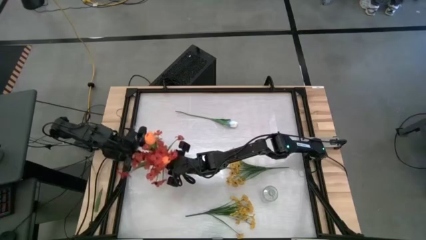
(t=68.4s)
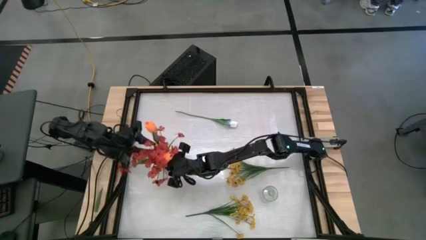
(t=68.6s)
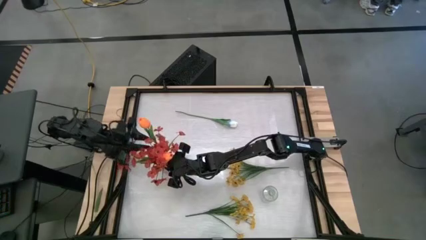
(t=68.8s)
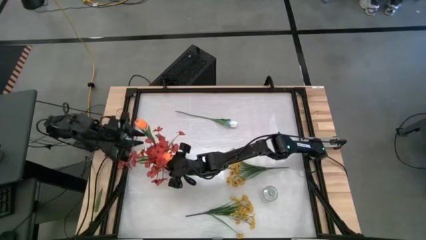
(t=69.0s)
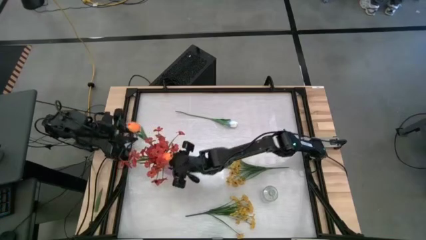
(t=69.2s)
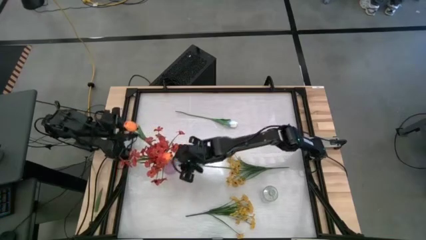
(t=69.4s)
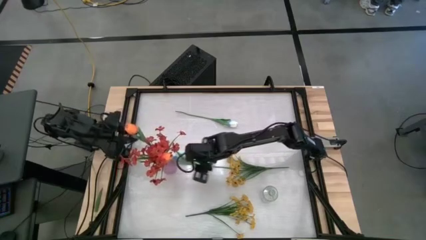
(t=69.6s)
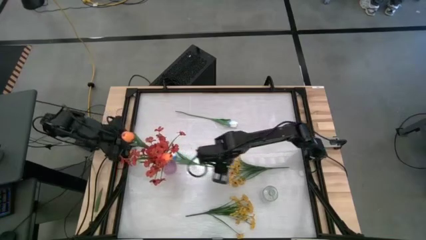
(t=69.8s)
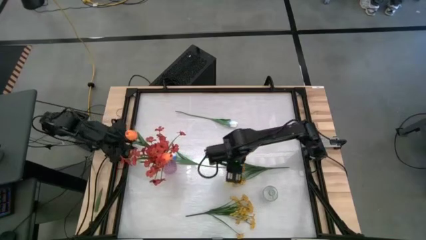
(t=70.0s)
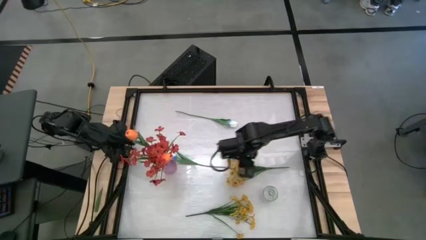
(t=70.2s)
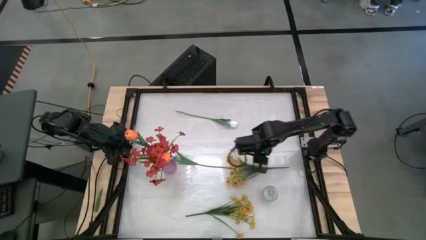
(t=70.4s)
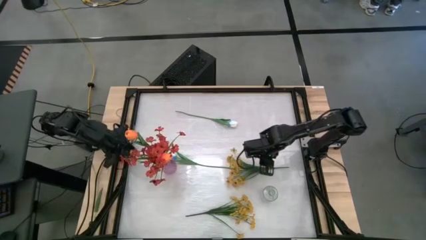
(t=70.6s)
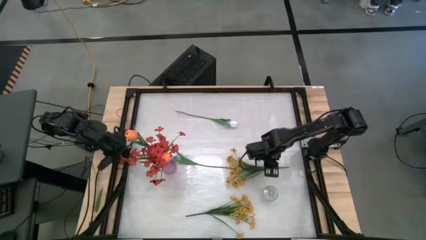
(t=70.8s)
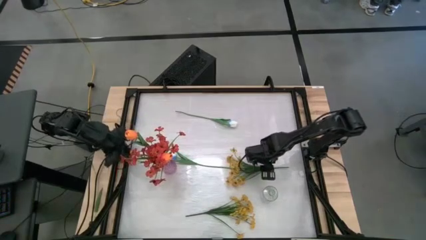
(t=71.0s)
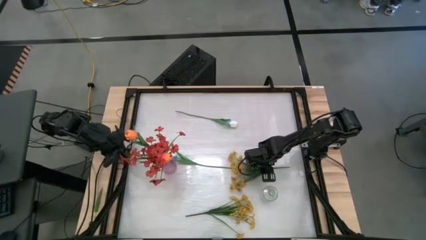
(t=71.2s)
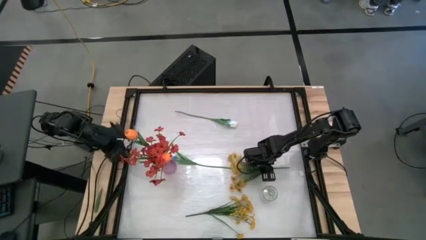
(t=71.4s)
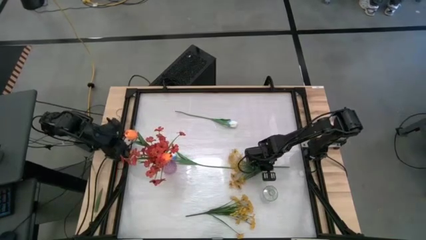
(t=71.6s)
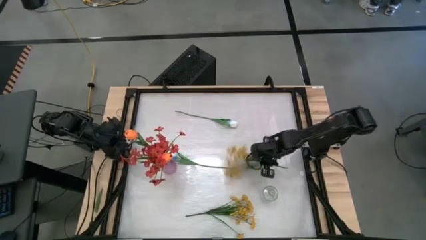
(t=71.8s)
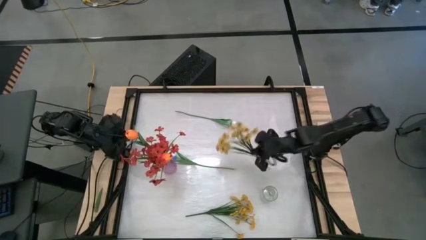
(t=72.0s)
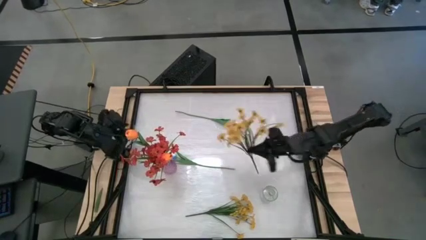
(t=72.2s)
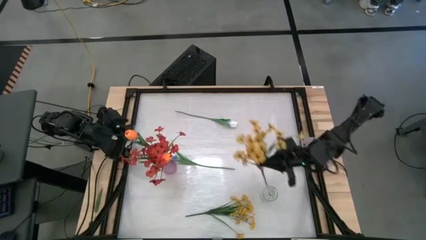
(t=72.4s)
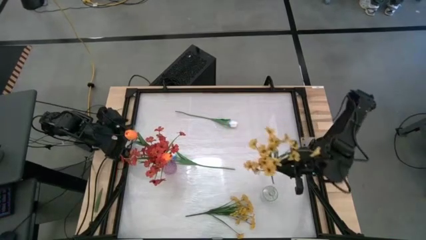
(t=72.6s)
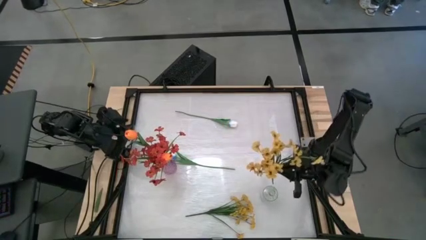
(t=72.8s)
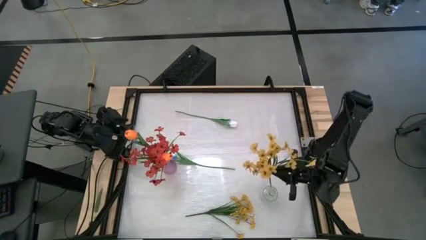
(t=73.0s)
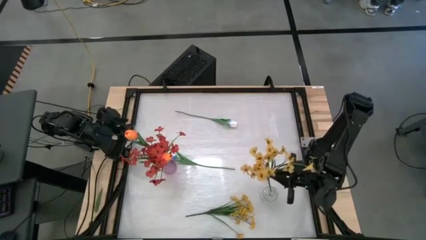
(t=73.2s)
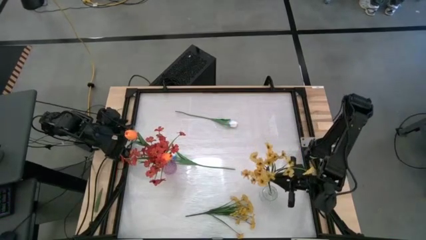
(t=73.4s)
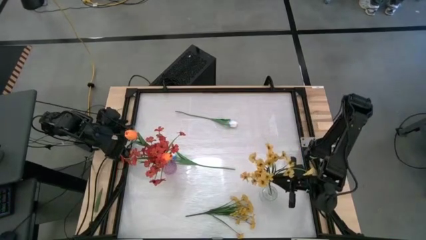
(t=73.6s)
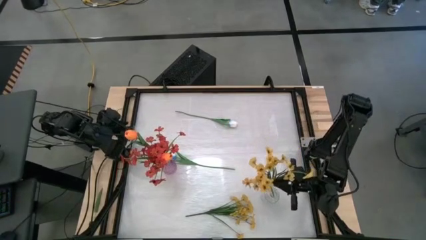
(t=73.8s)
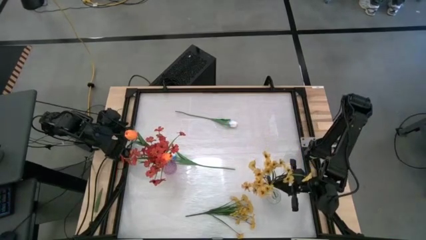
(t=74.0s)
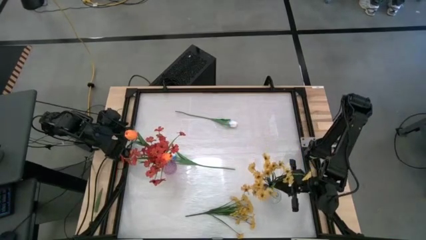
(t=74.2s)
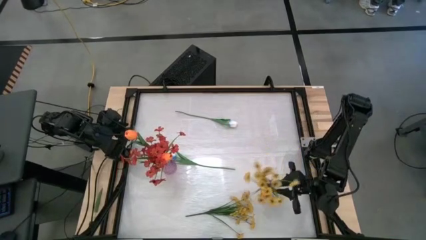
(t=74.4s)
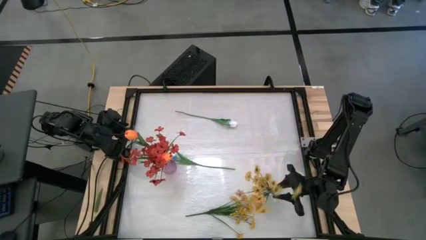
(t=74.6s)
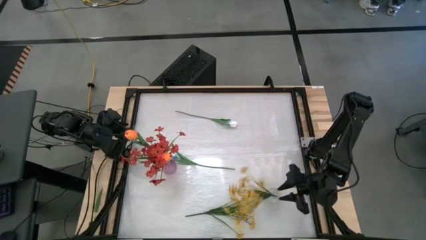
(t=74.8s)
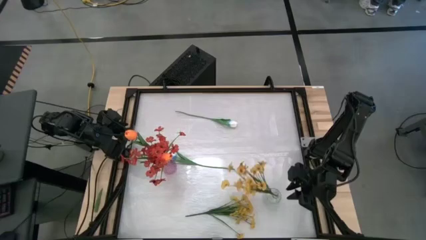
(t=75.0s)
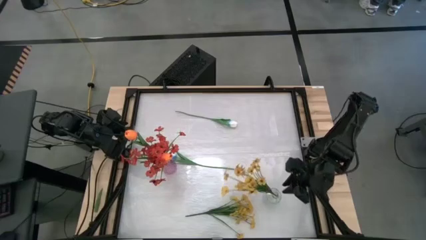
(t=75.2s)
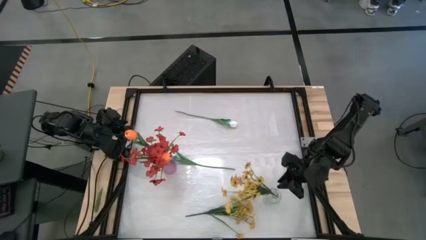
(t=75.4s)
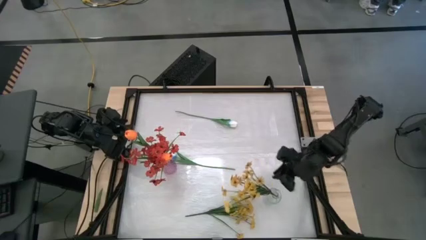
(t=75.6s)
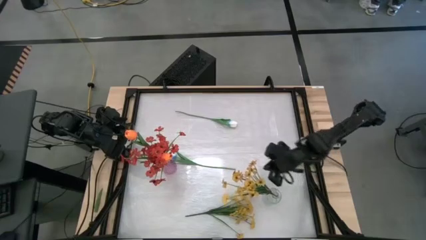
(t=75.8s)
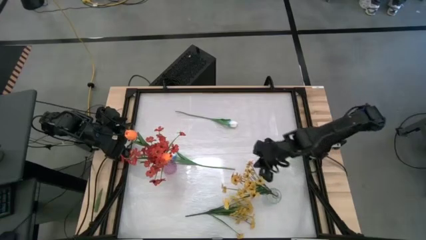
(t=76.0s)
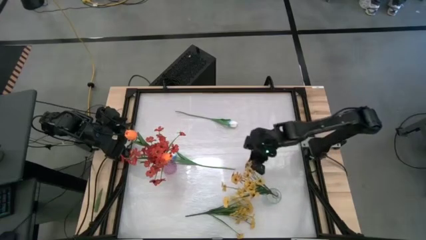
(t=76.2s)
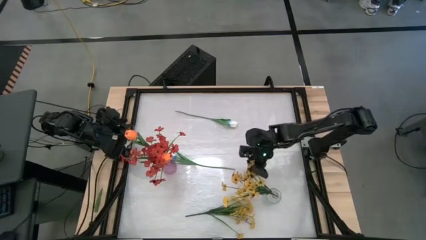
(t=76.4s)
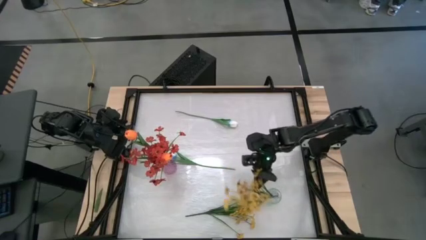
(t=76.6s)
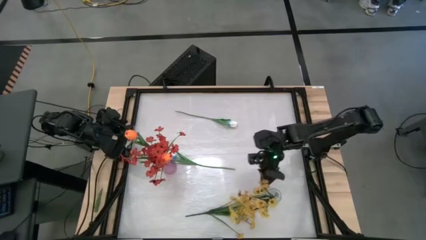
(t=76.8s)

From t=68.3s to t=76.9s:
Task: Sort flowers into vase by color
Put the top yellow flowers into the transparent vase

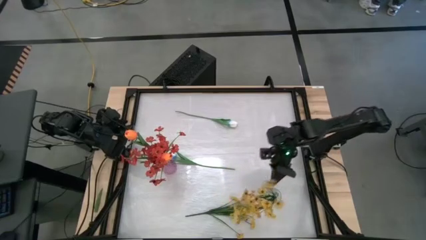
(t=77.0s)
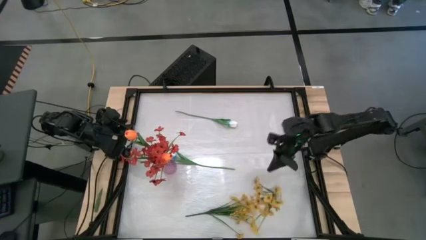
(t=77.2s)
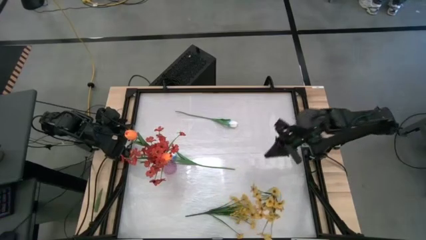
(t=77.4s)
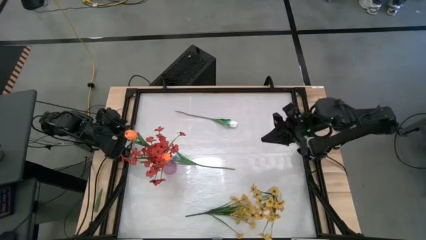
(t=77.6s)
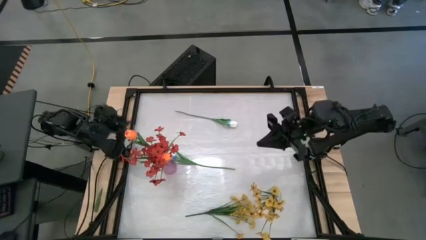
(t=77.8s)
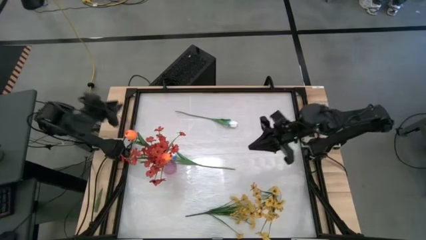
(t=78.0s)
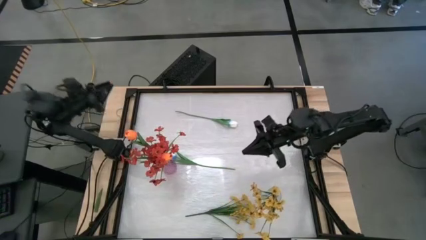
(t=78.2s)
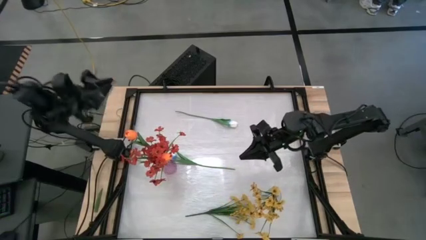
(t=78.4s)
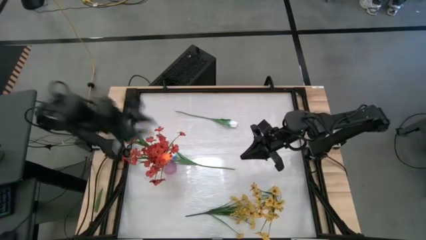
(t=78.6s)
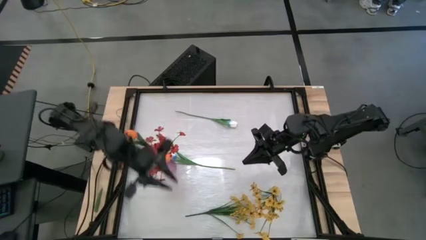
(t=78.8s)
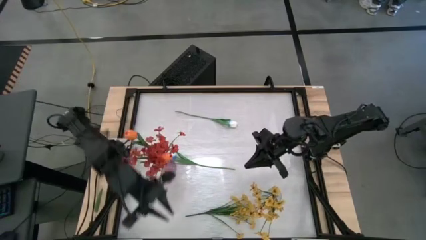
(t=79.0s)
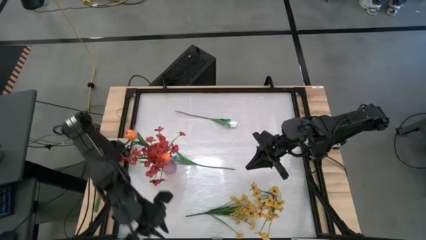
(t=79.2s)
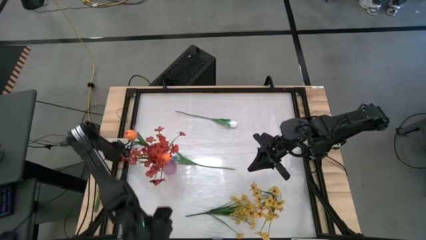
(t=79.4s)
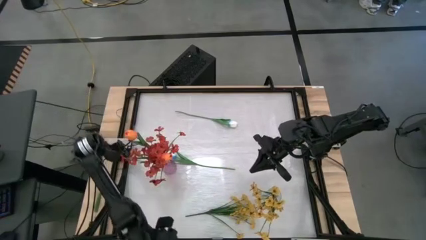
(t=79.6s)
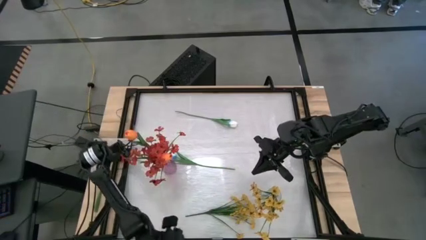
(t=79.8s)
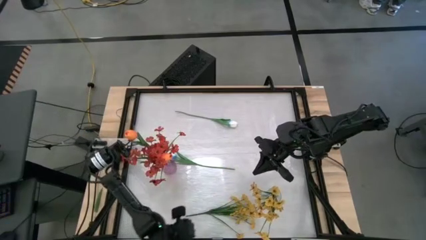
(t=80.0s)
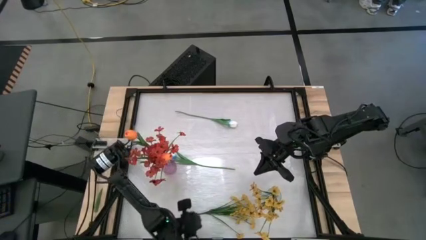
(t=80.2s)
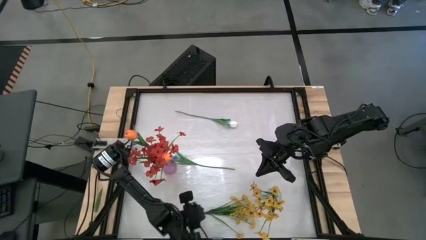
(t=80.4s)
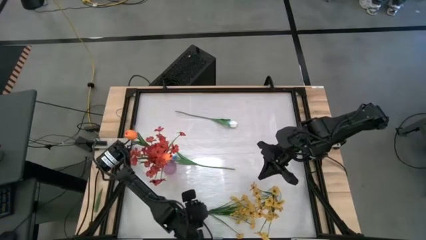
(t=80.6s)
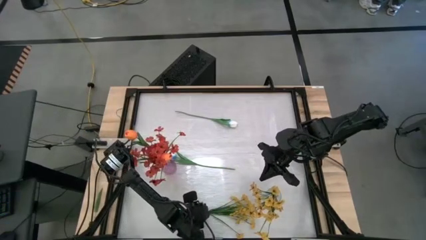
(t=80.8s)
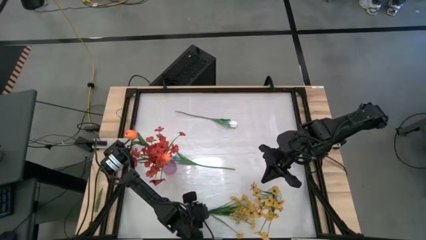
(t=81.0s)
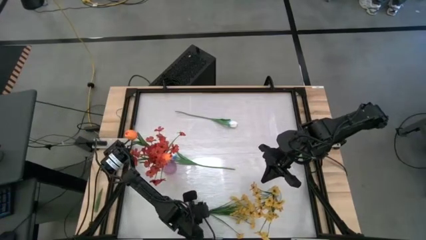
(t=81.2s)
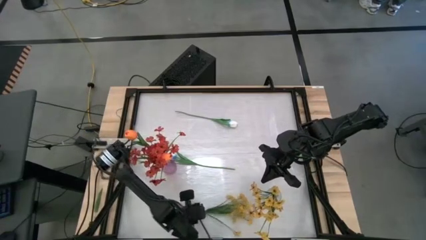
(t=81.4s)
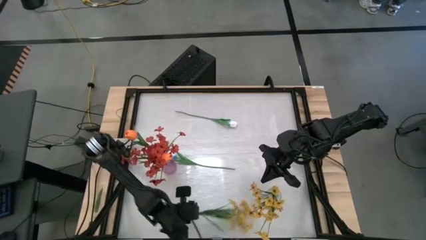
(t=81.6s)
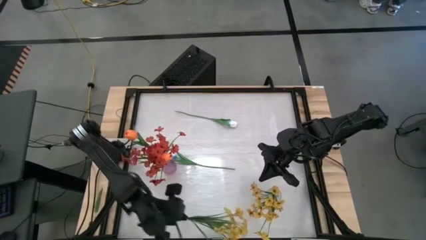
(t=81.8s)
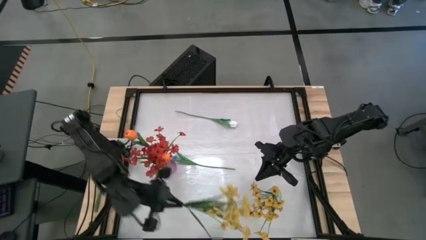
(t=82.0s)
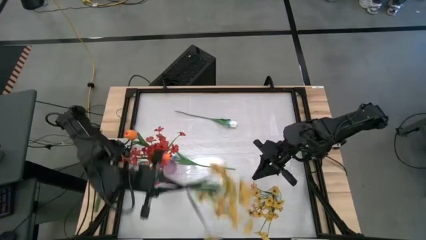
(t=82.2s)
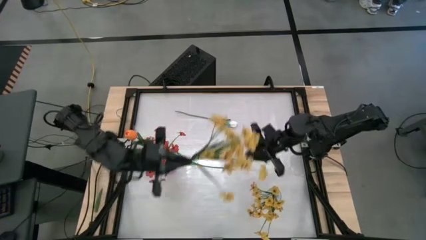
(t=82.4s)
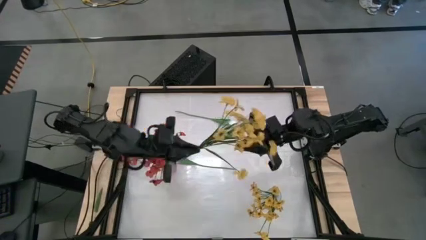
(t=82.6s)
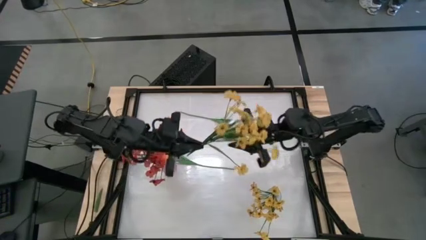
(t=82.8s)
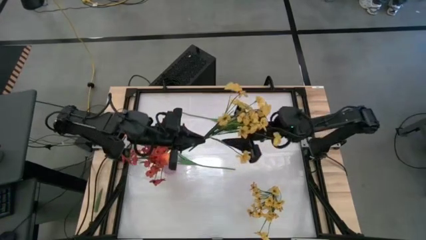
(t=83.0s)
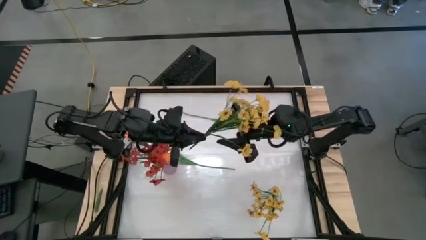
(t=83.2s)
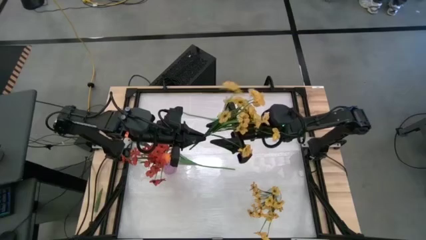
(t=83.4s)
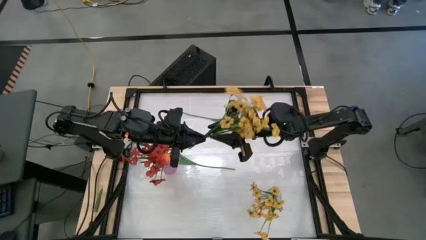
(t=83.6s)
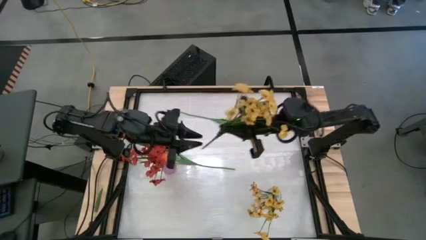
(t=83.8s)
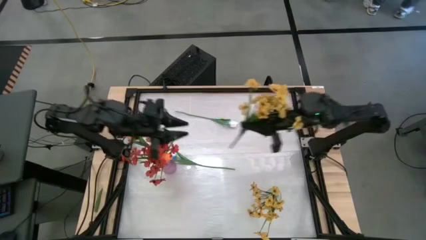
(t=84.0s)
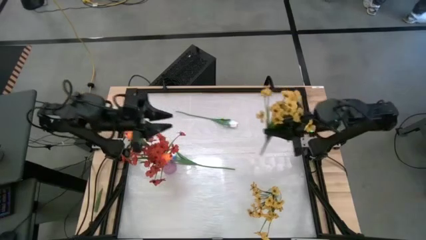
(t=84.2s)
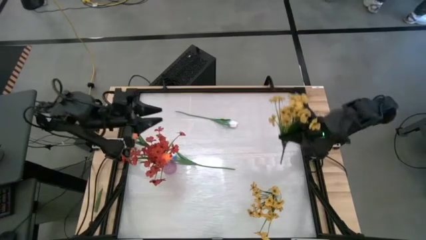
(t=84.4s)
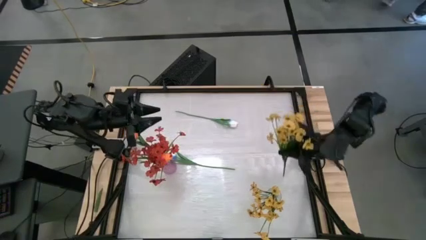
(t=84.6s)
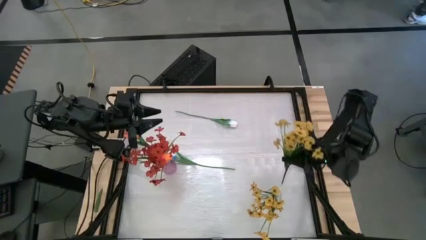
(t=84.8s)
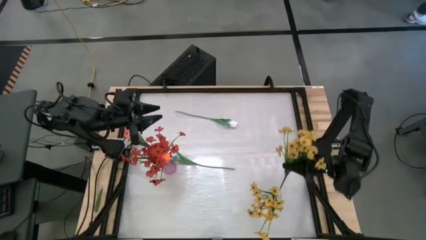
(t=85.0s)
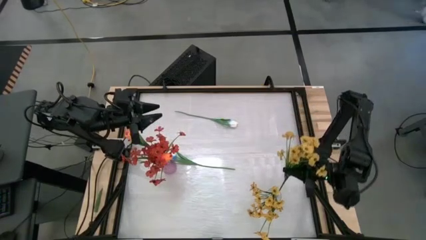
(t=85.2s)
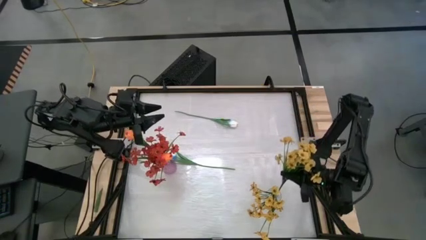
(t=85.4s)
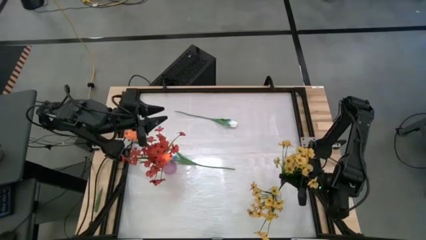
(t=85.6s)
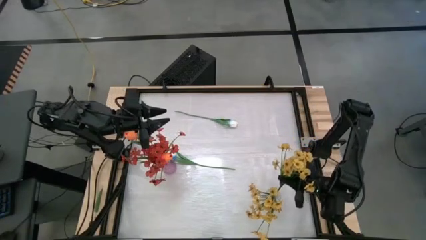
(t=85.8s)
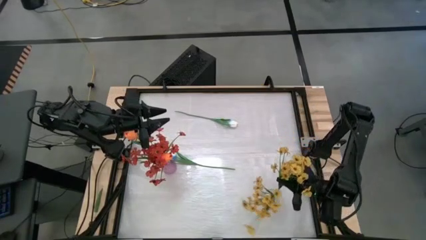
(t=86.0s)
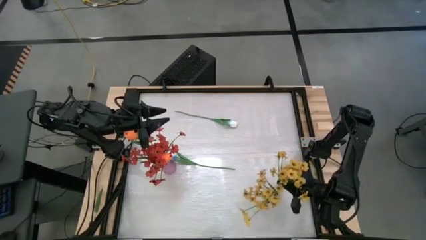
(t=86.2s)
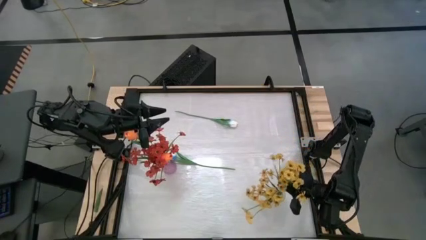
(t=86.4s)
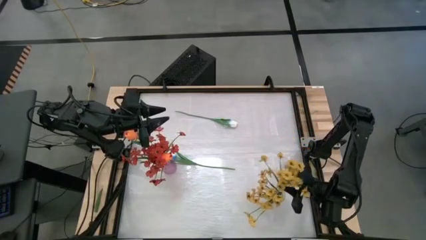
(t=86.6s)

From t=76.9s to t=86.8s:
Put the yellow flowers into the transparent vase
